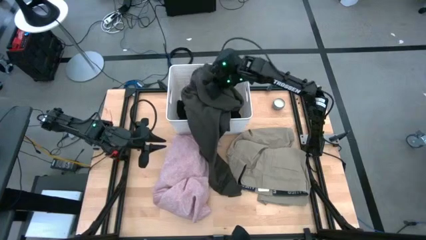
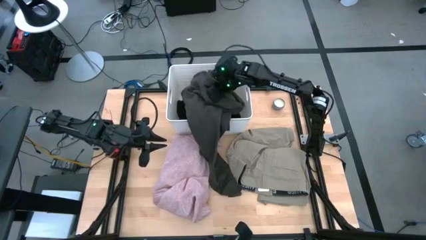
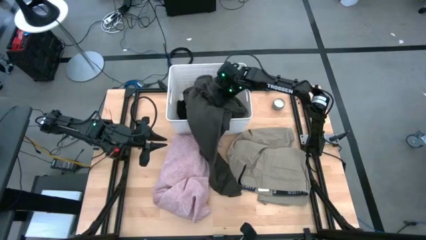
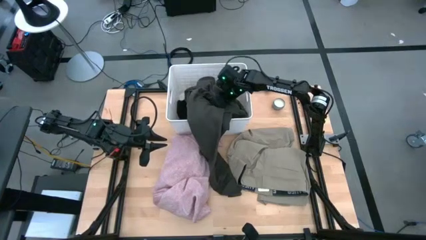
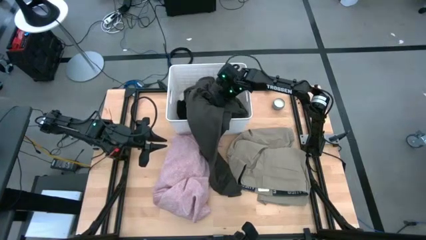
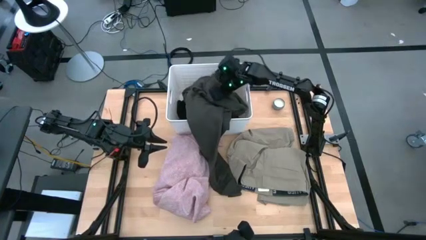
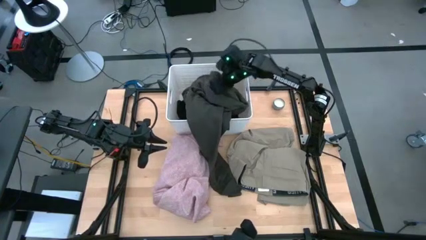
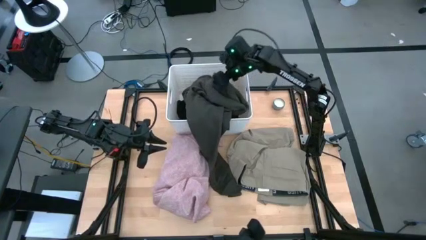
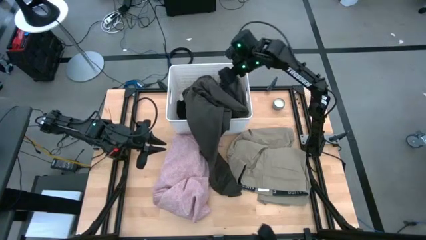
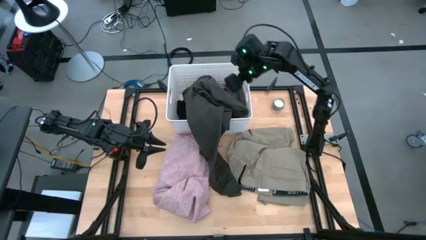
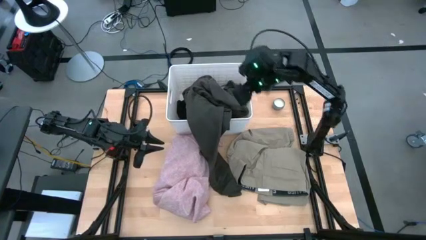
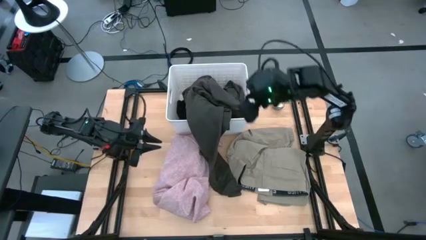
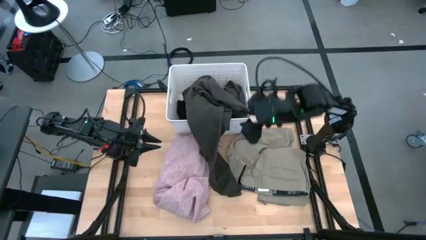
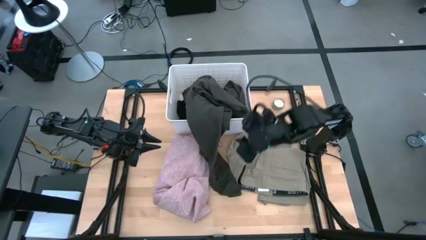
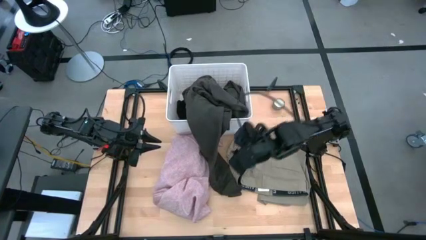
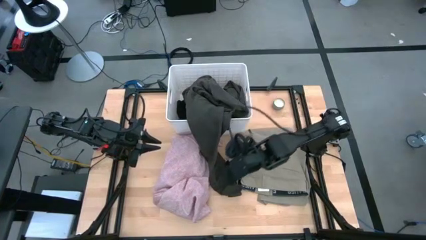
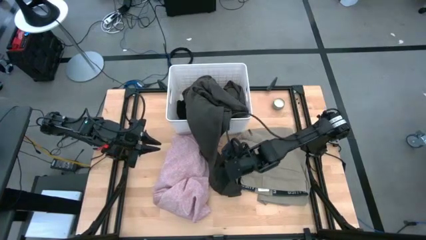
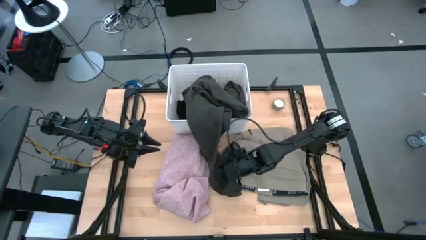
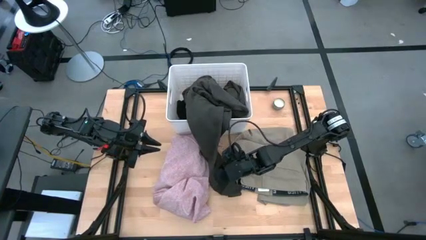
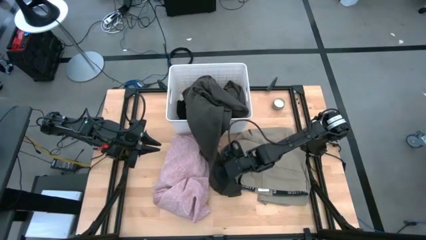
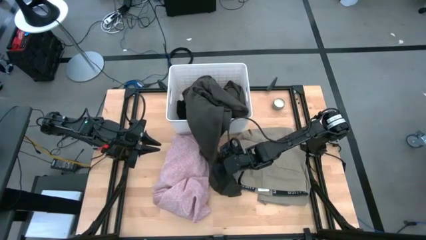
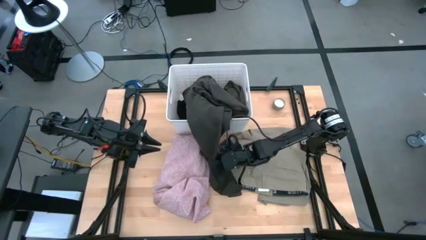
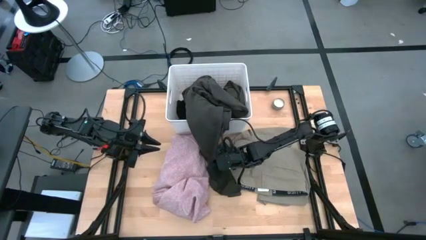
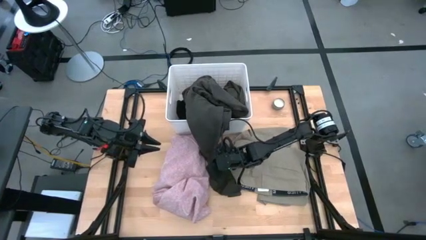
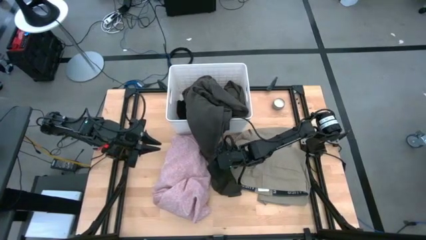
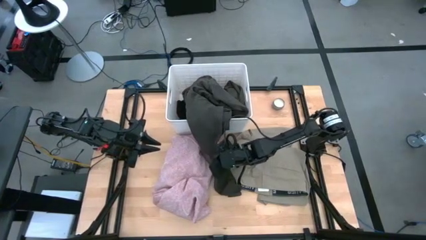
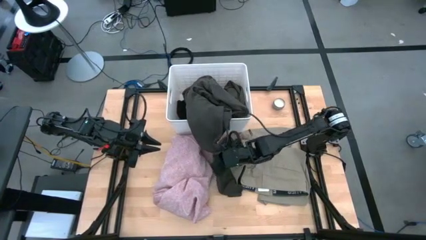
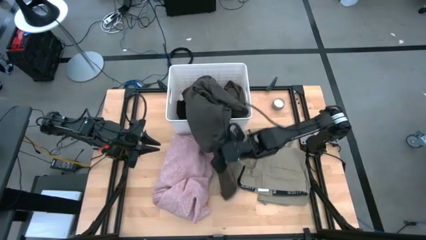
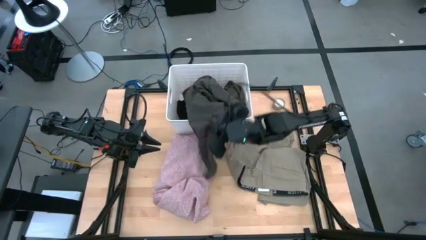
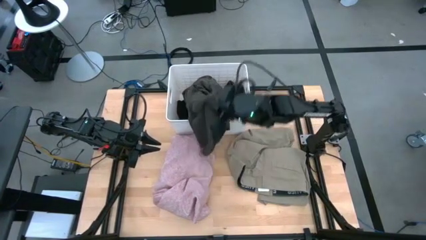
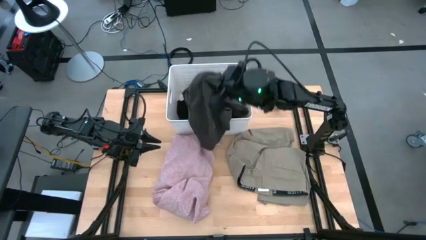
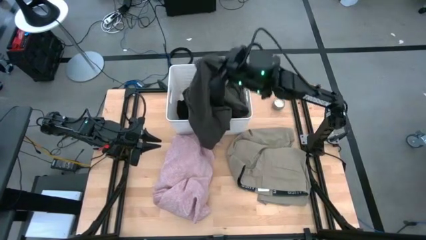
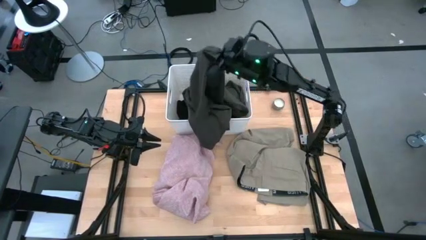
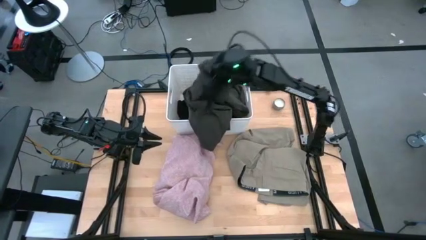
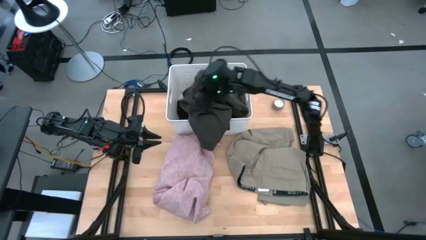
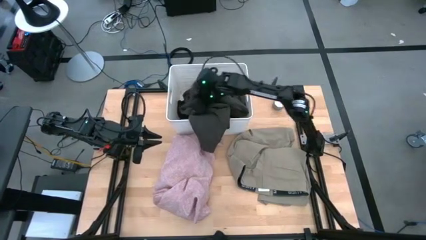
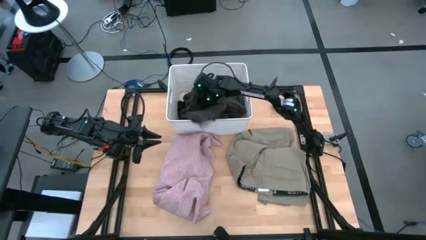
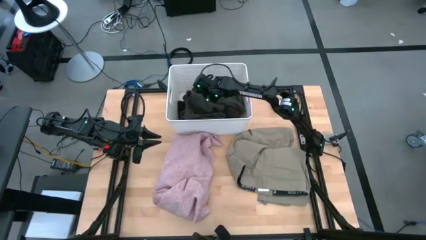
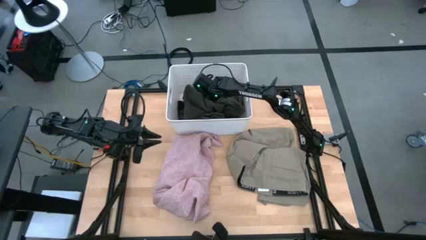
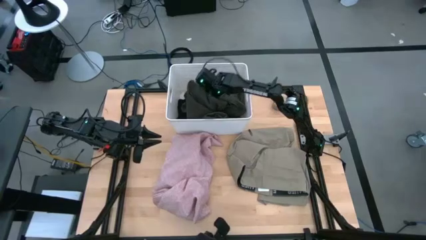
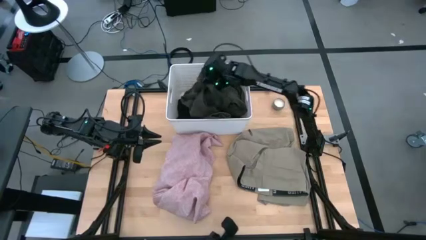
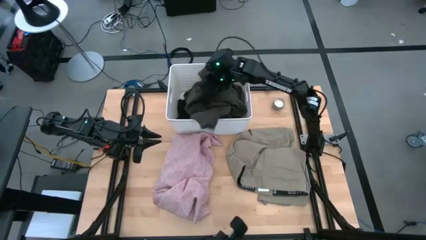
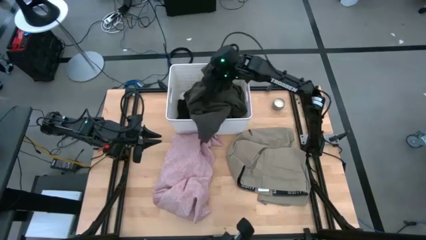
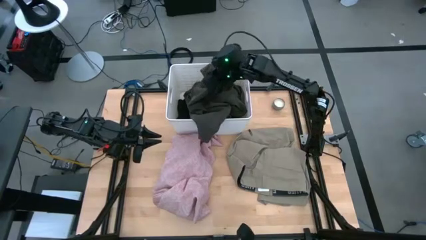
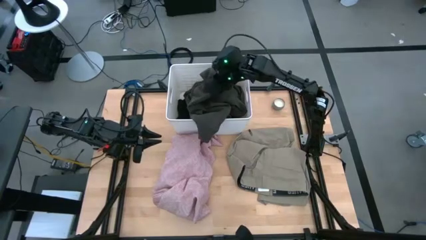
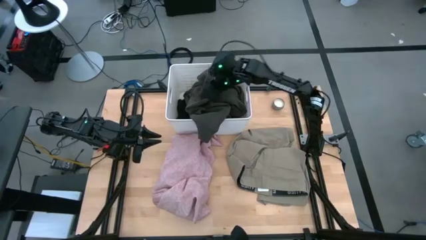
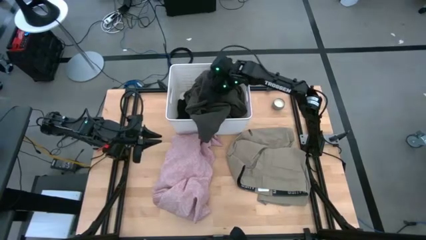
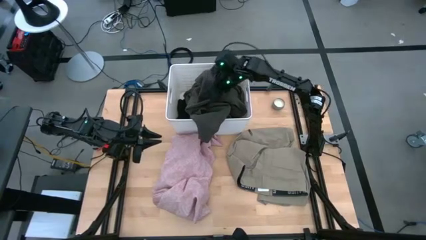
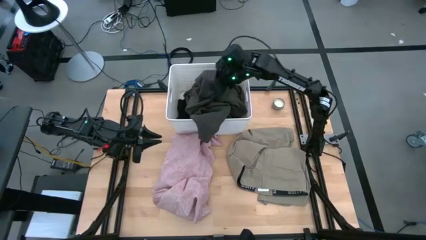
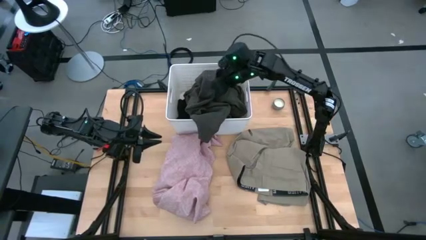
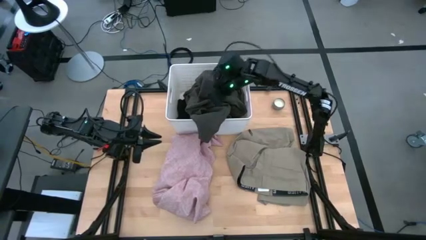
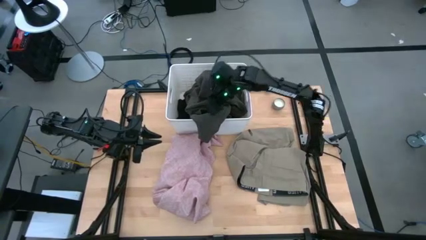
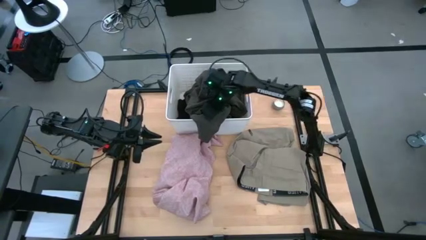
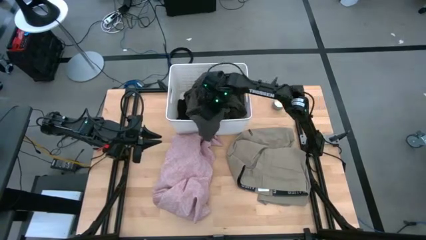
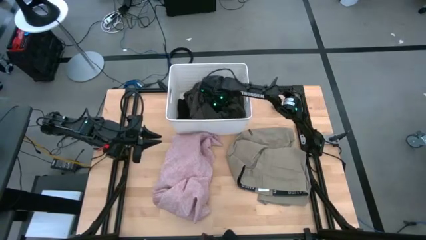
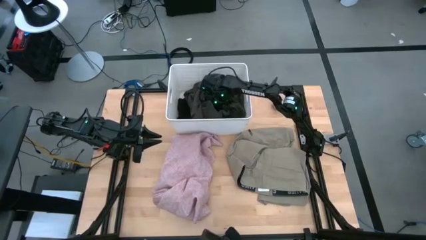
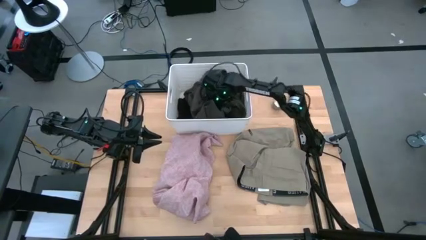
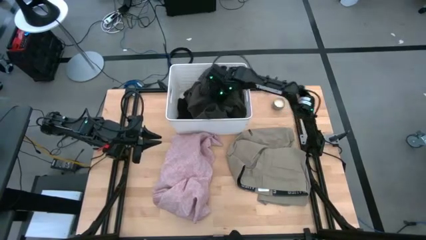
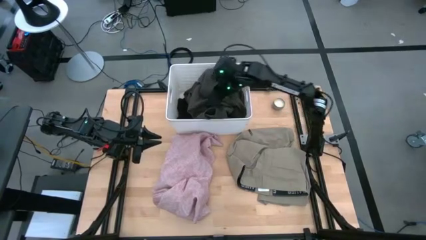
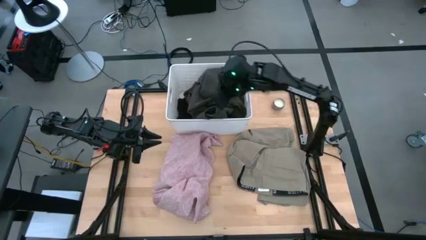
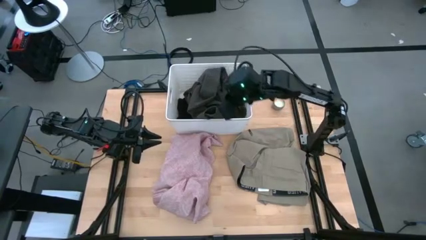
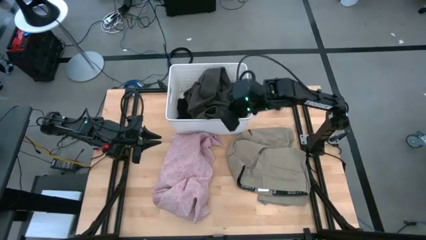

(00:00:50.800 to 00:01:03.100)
Task: Sort clothes
Put the green pants into the white laundry organizer

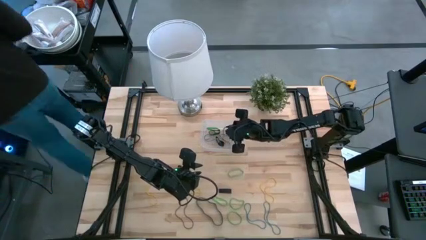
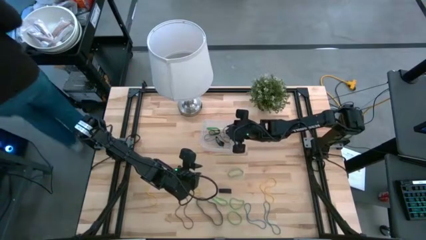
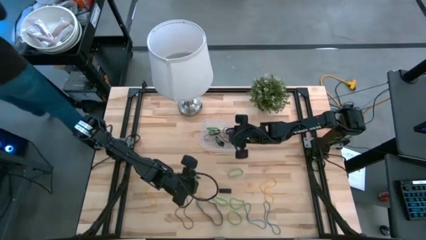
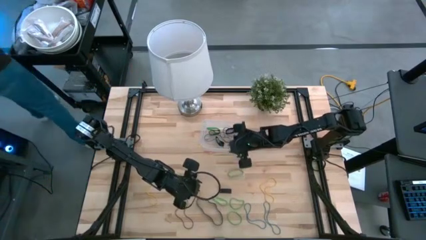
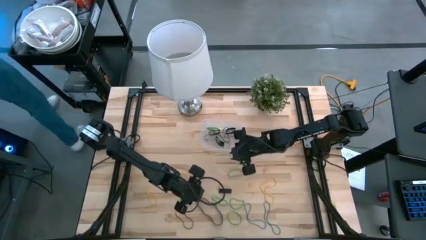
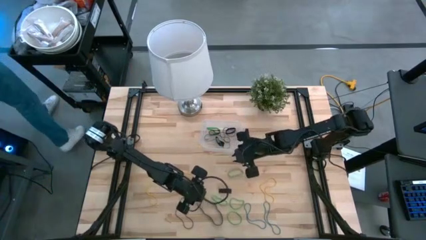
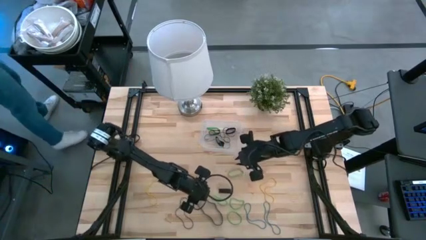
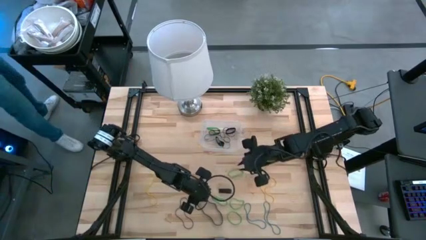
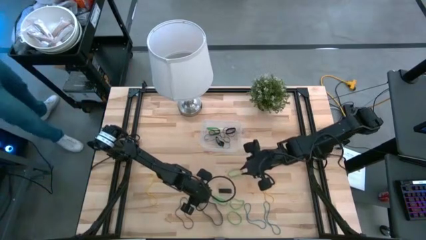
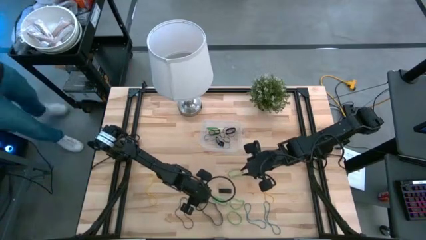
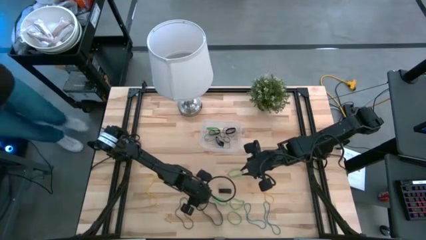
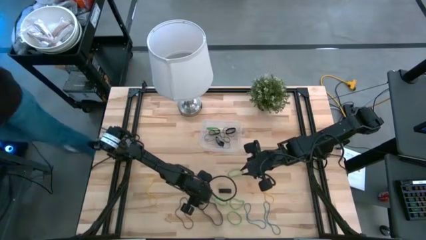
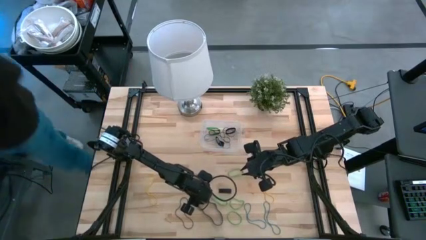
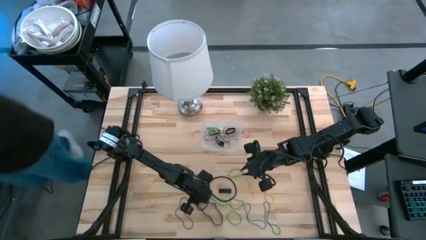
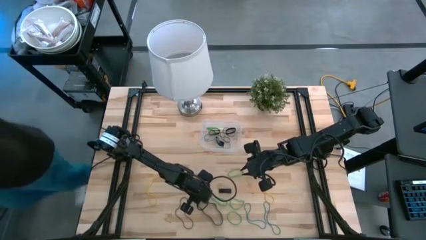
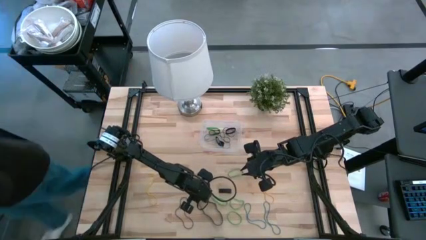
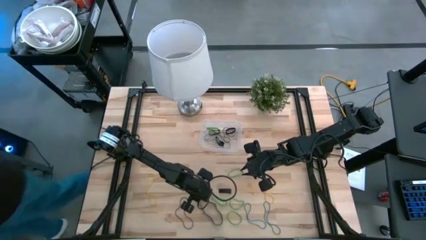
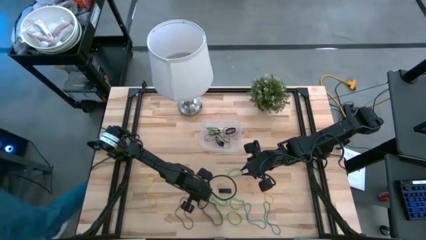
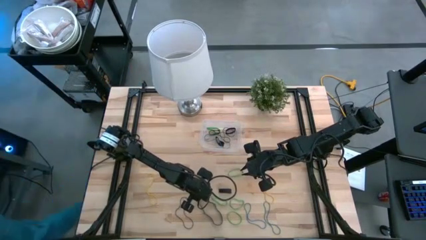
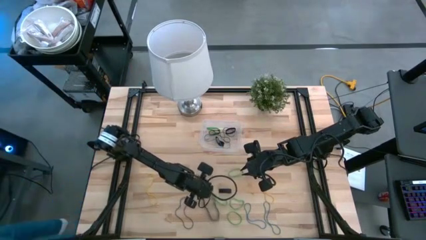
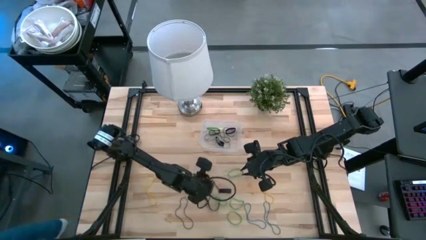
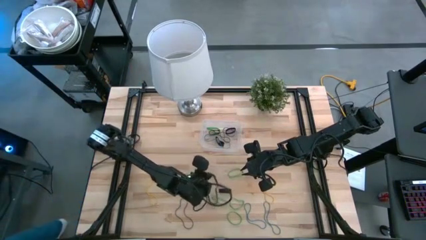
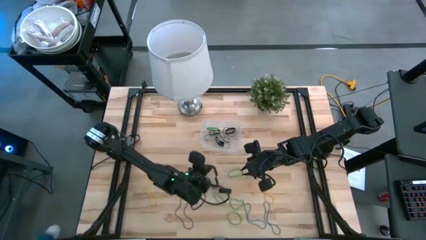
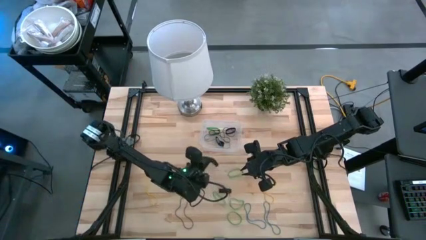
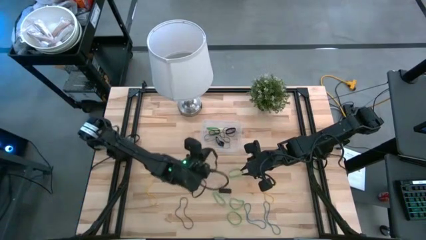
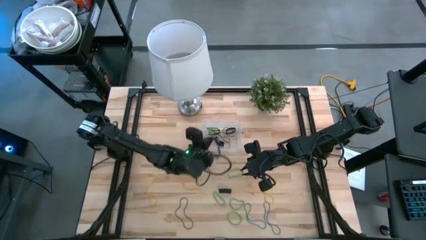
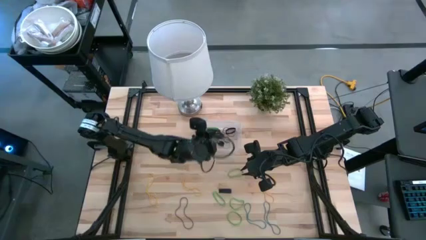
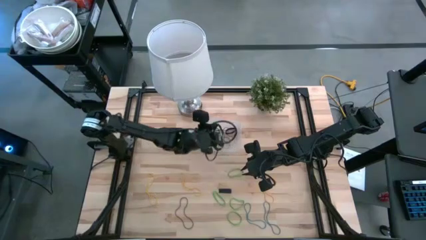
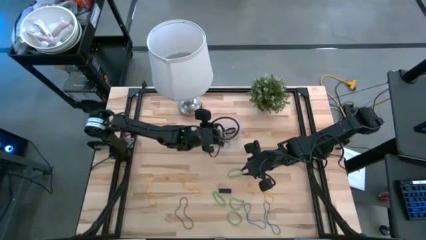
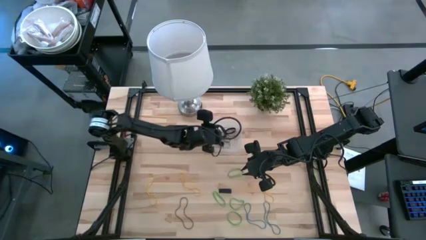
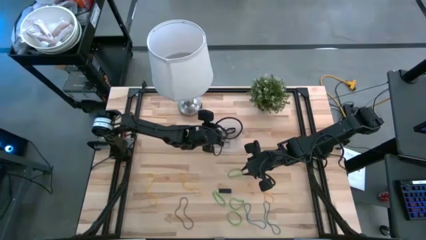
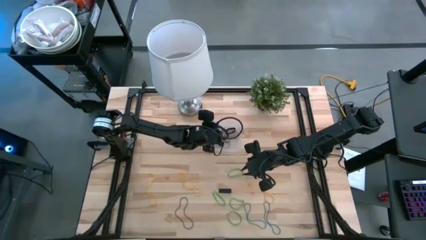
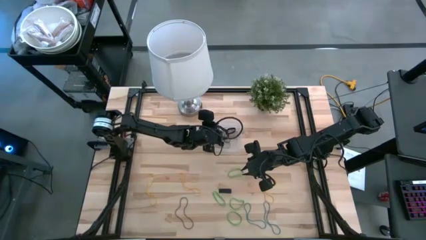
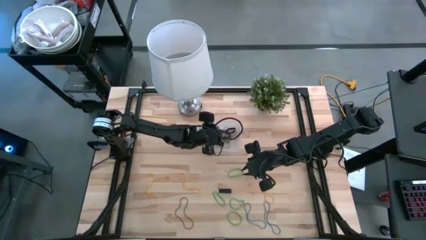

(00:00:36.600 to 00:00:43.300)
Task: Pick and place rubber bands into bin
Put the black rubber band into the transparent bin
